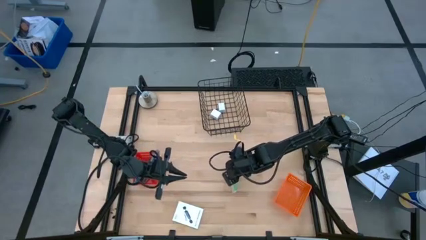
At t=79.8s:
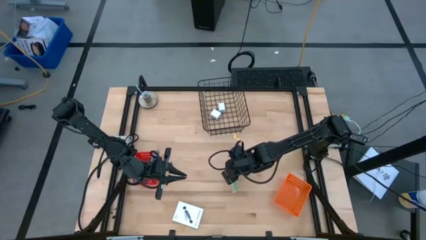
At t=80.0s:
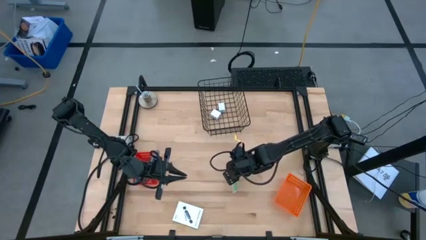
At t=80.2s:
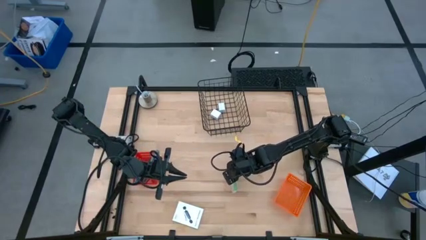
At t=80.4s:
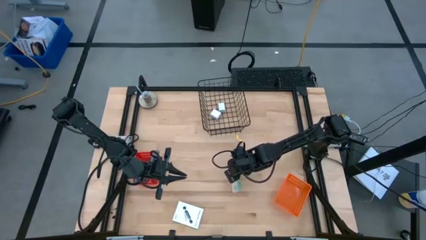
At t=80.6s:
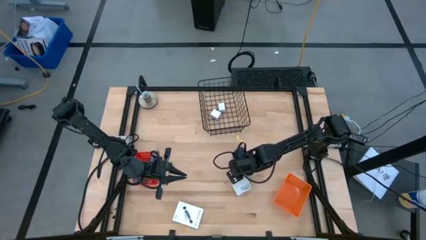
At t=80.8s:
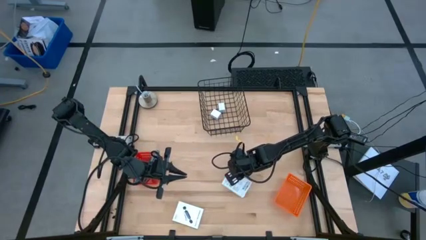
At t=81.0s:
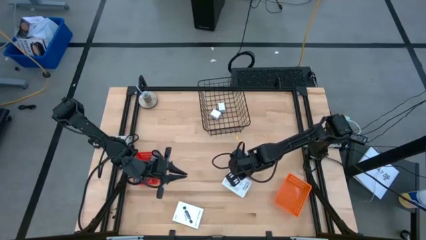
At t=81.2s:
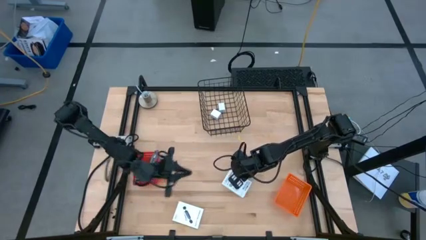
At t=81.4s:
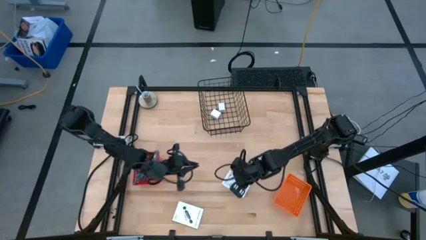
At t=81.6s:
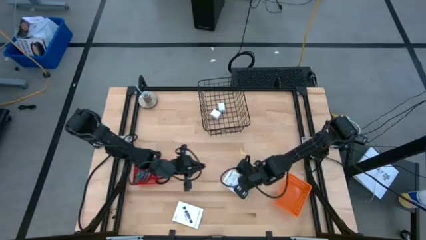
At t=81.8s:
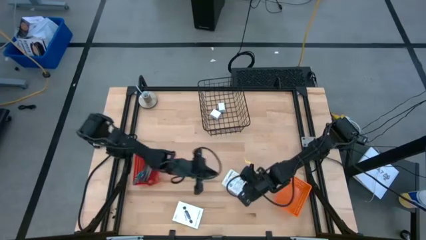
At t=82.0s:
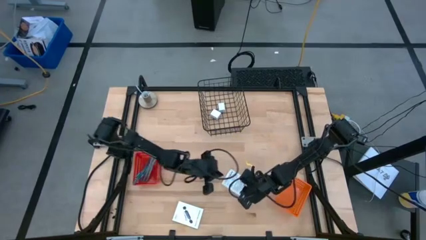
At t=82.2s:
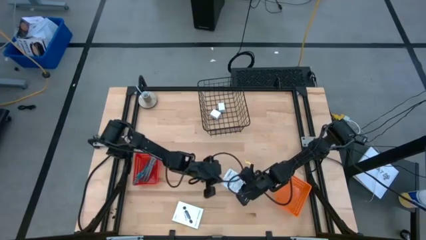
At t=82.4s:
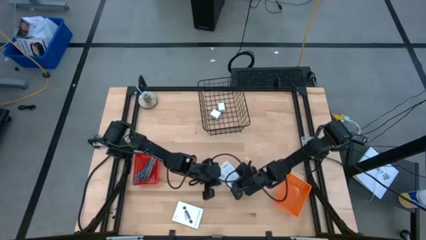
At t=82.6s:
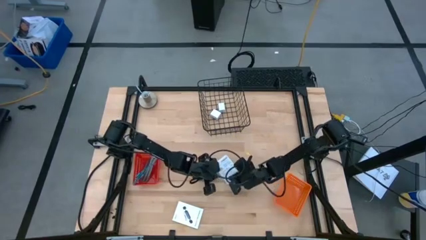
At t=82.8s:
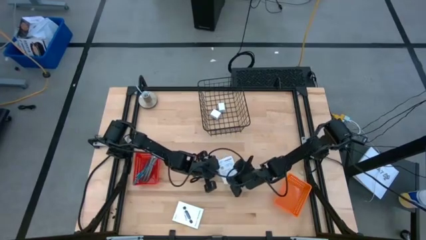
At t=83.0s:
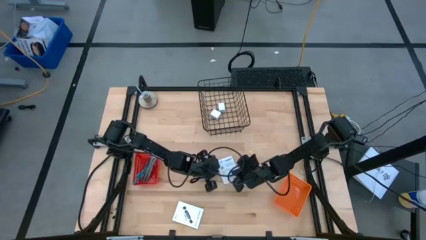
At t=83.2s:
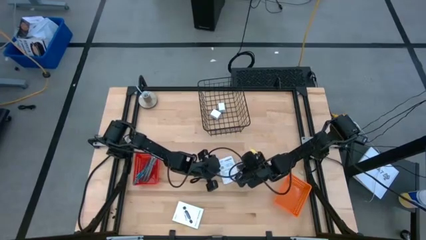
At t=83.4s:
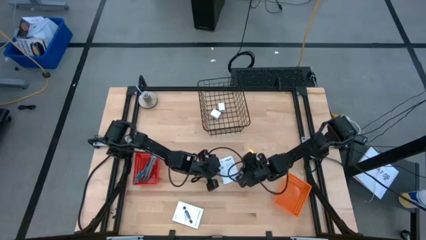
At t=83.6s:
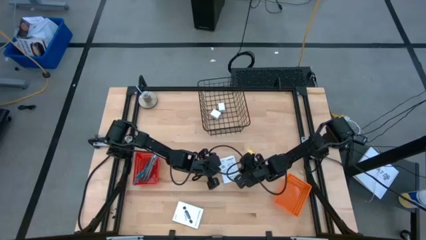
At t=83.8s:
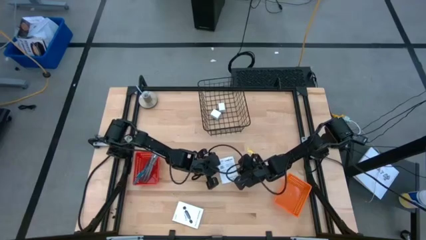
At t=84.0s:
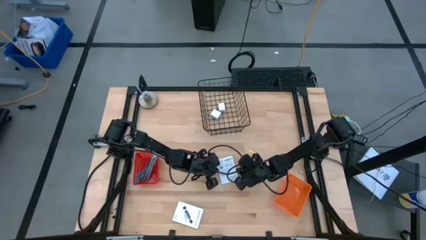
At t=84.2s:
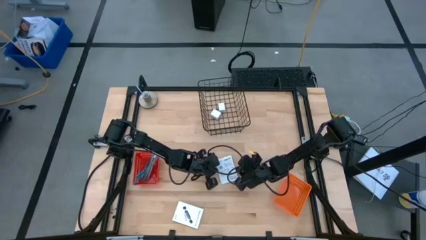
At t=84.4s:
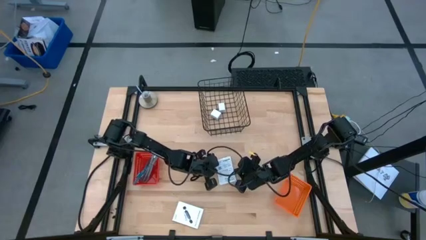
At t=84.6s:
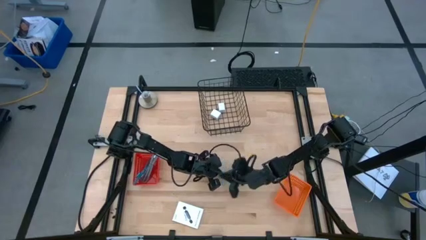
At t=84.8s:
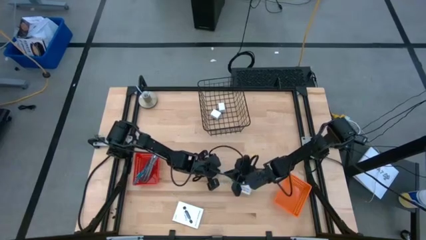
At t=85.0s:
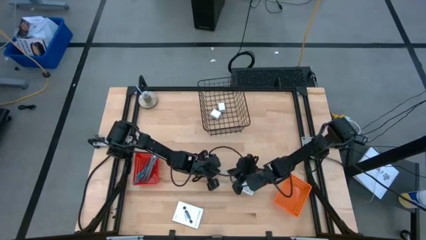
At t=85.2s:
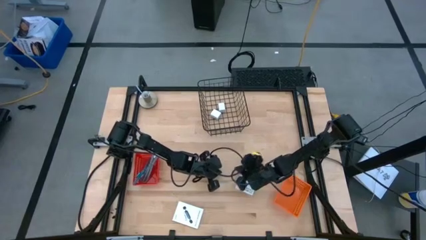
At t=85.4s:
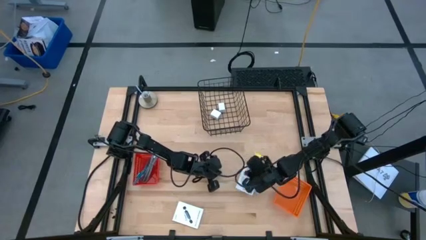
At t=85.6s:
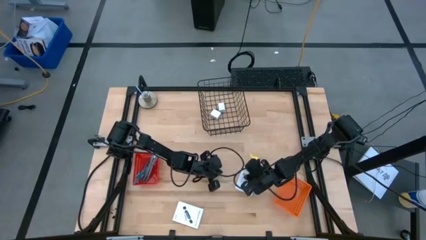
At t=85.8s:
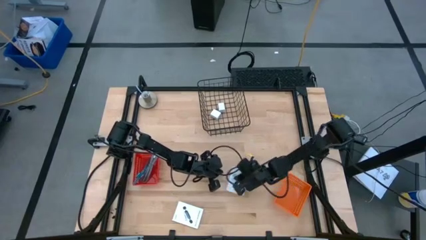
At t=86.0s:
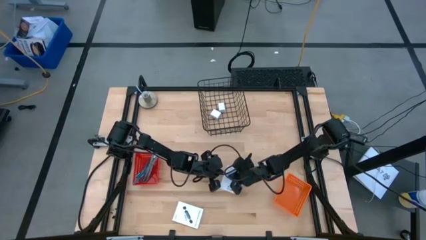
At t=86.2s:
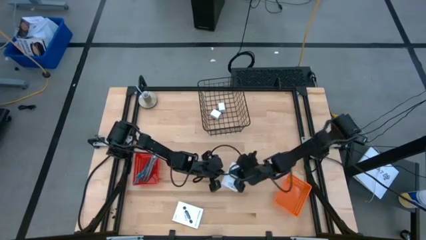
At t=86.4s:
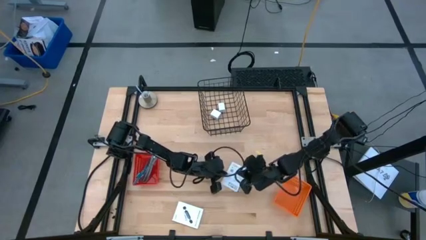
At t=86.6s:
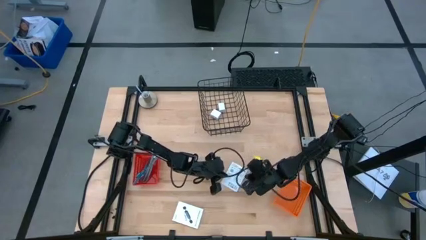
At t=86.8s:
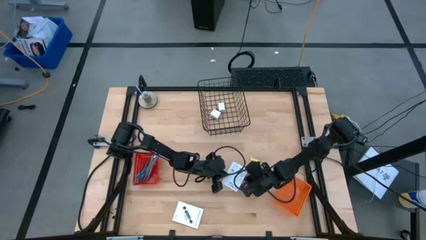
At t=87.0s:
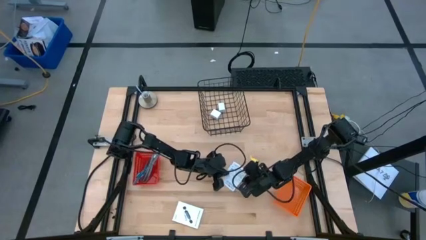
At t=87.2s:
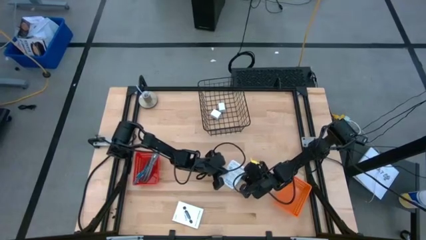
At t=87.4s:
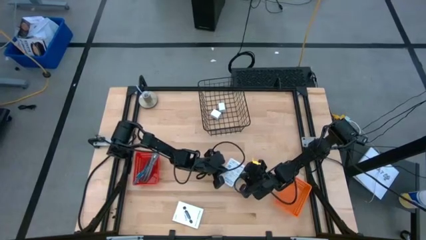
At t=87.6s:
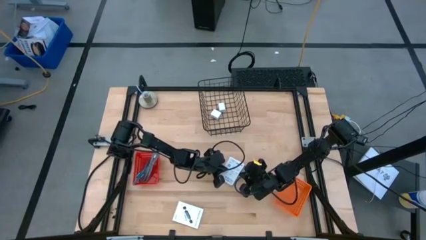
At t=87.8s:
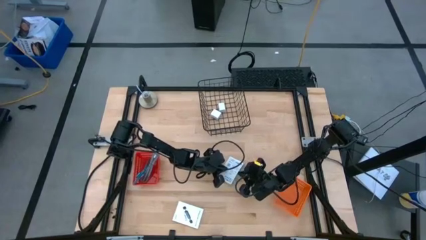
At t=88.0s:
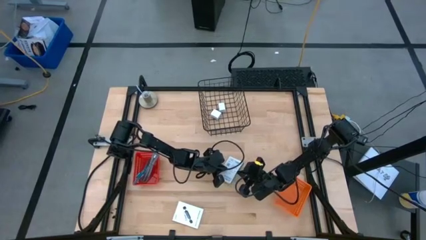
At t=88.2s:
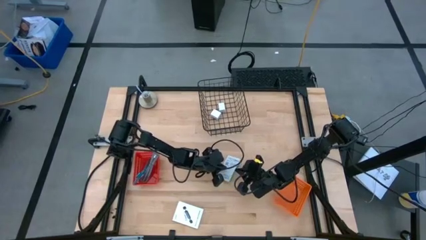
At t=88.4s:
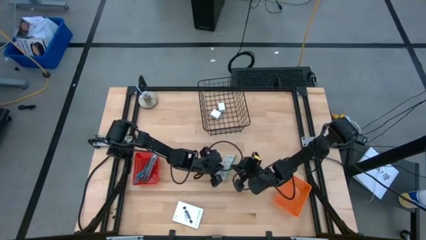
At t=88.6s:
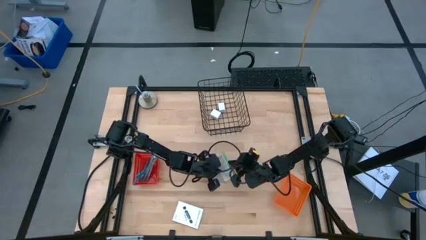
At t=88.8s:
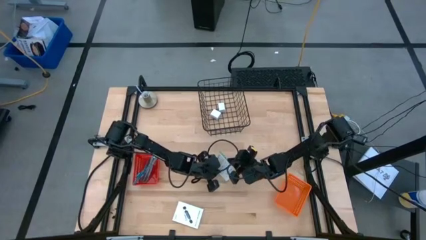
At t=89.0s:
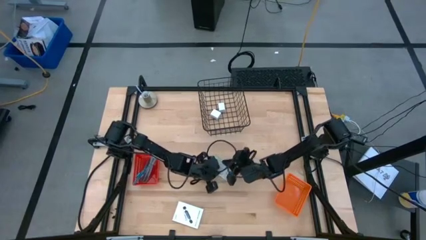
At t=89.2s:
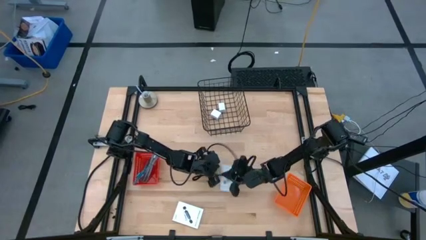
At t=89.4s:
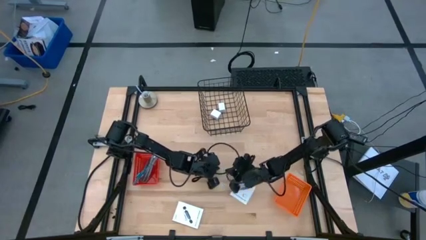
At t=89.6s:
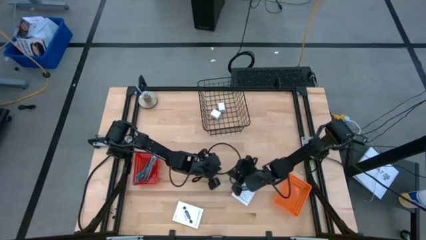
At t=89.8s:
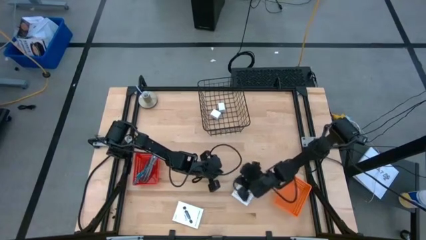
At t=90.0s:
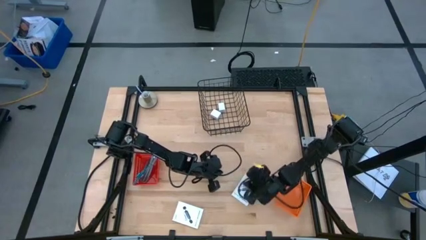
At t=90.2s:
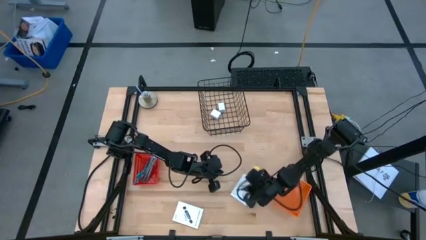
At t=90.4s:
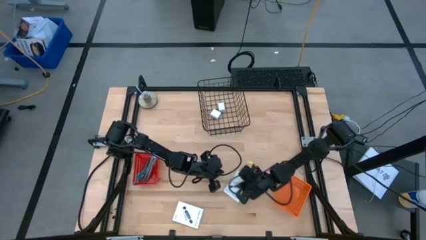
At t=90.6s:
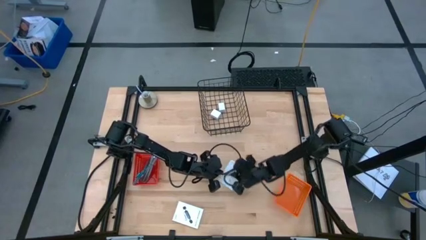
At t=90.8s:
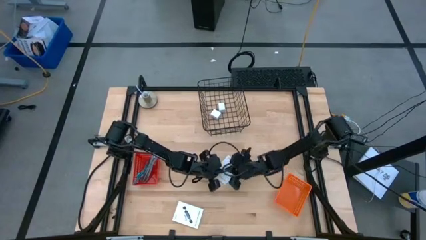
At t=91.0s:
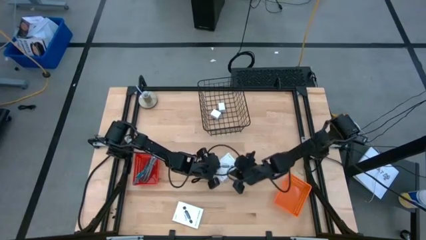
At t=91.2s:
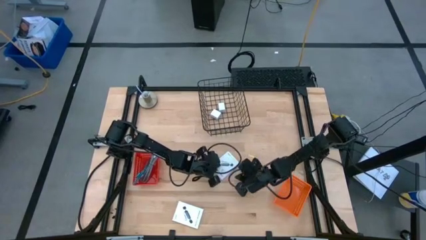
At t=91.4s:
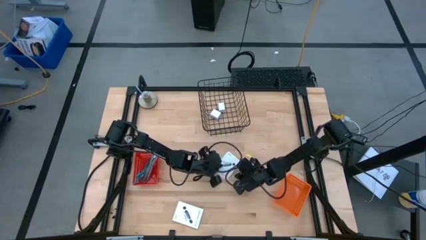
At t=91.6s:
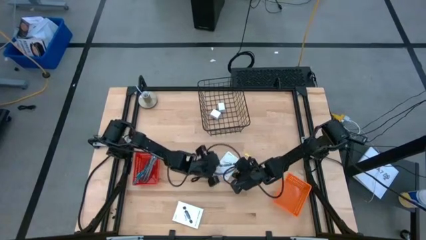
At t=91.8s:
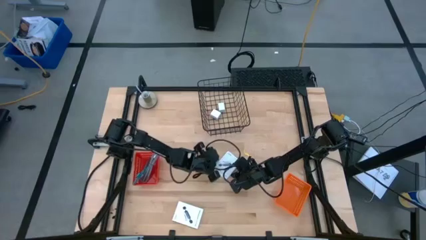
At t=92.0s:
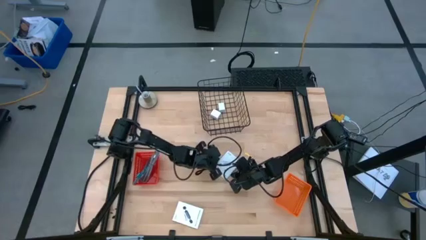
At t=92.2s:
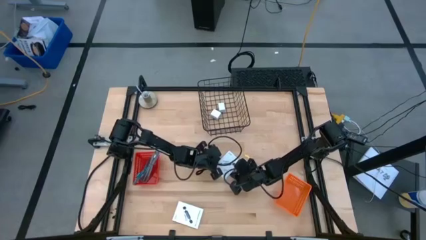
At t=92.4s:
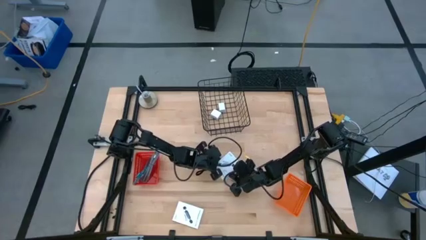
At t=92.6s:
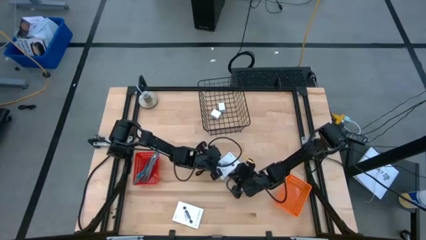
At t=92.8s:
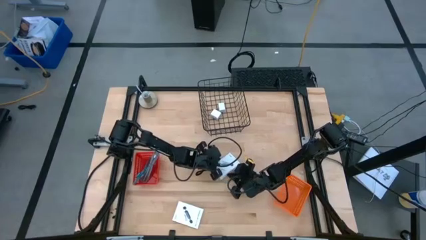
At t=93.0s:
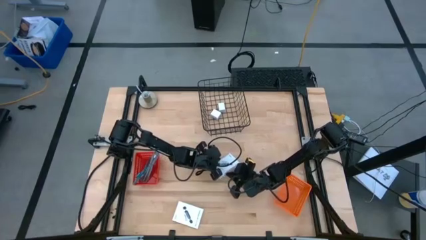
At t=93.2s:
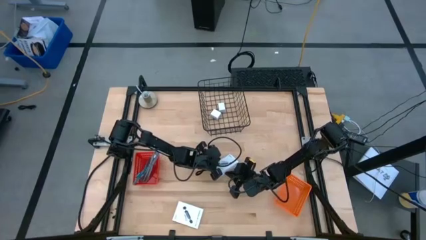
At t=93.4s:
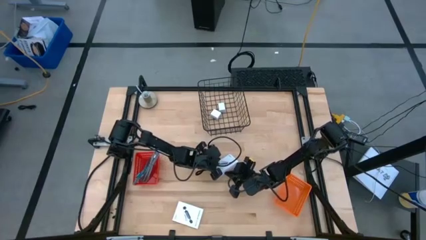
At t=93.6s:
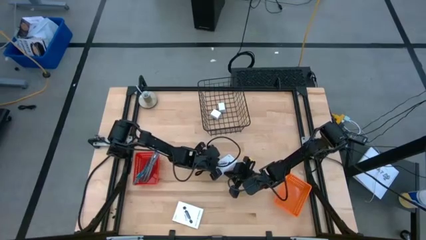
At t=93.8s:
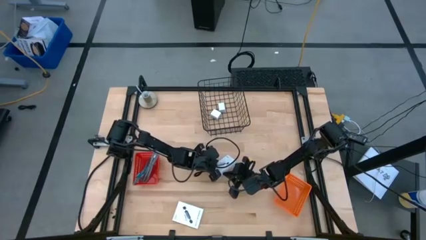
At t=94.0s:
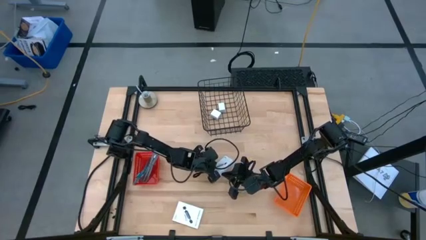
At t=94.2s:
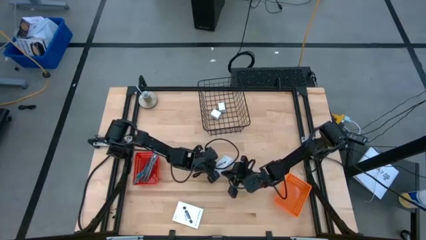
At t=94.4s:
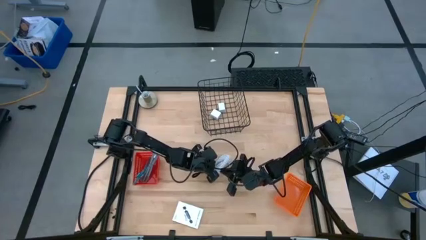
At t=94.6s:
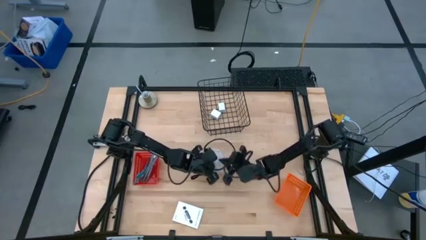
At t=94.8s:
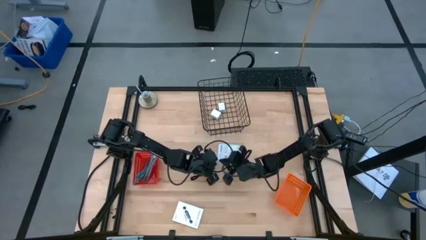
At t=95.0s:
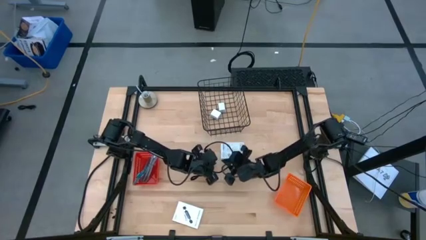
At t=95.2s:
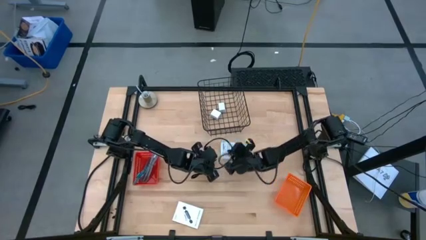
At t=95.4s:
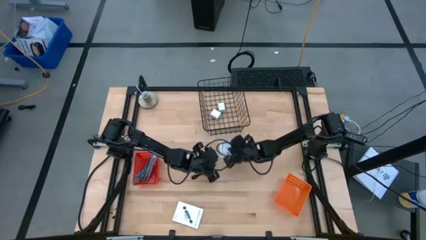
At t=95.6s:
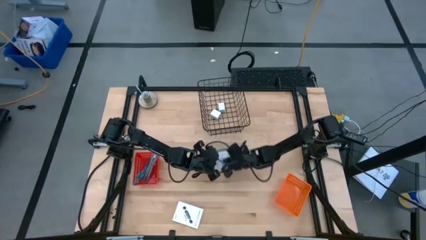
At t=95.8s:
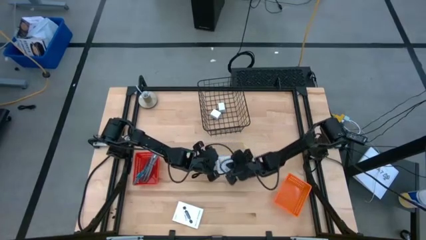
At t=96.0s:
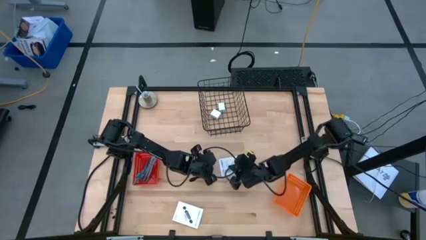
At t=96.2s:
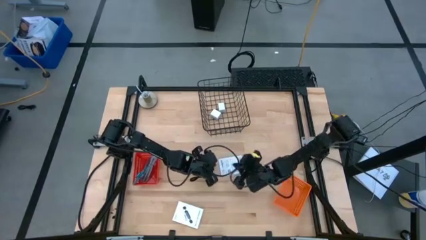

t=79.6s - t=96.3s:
Task: Pick and place items into bin
Put the right card reader box into the orange basket
